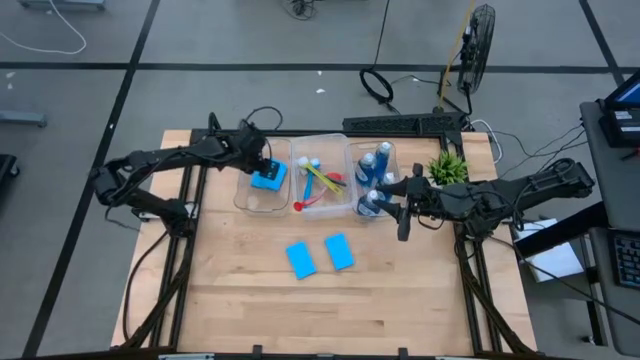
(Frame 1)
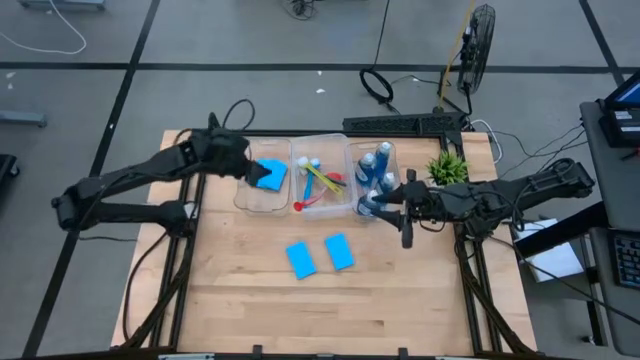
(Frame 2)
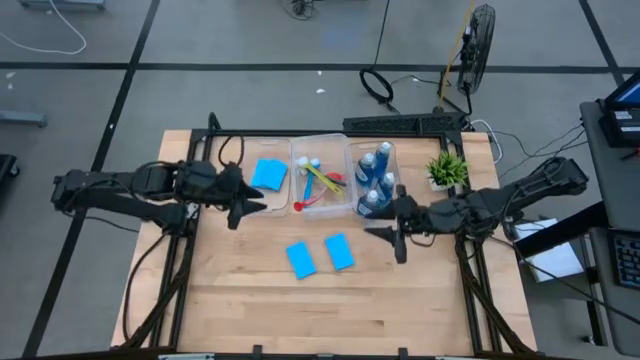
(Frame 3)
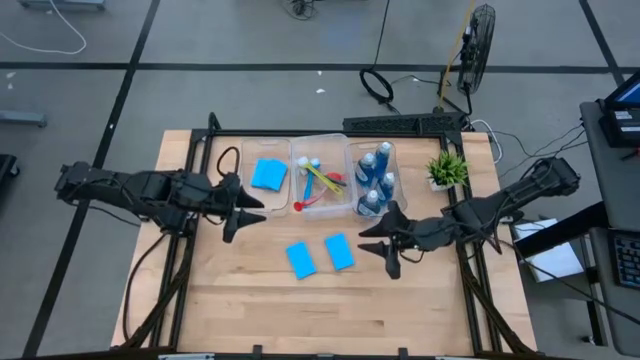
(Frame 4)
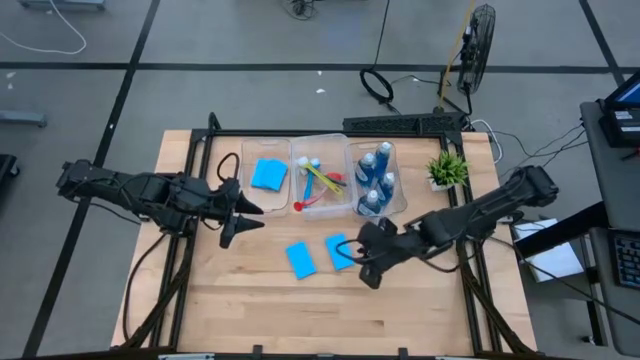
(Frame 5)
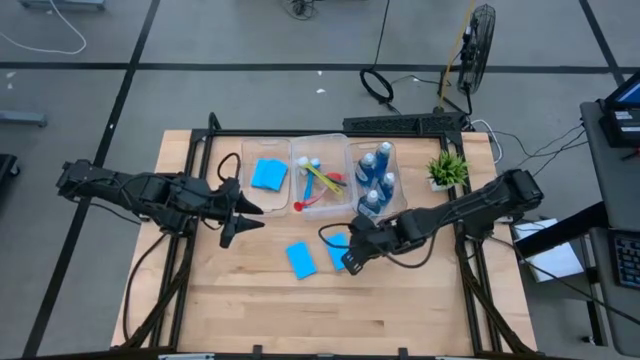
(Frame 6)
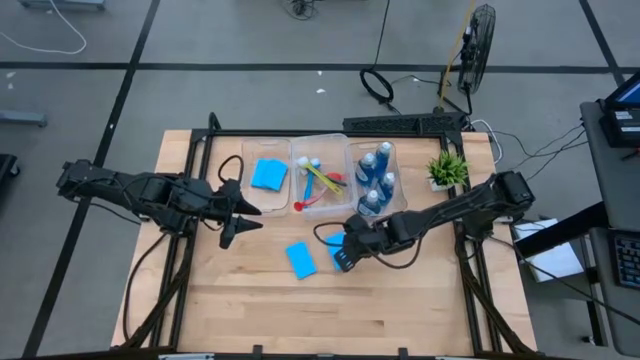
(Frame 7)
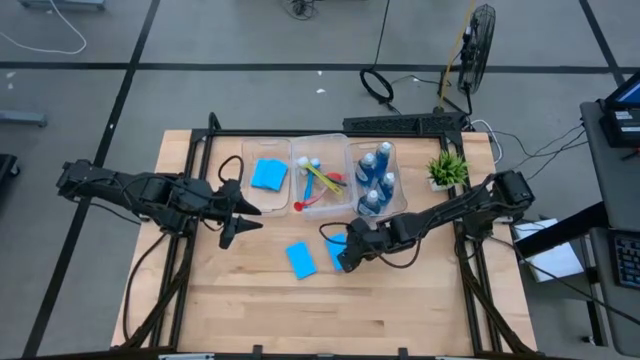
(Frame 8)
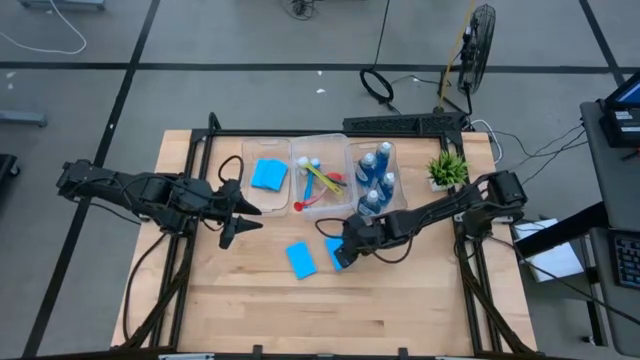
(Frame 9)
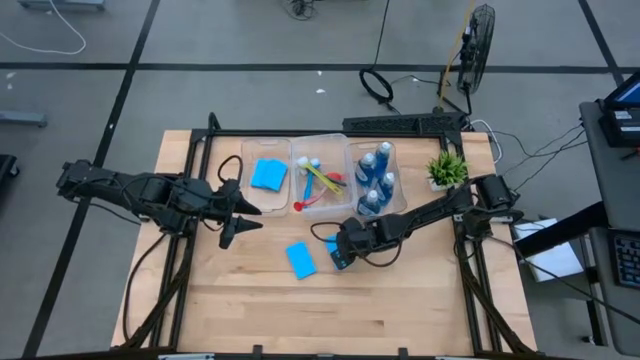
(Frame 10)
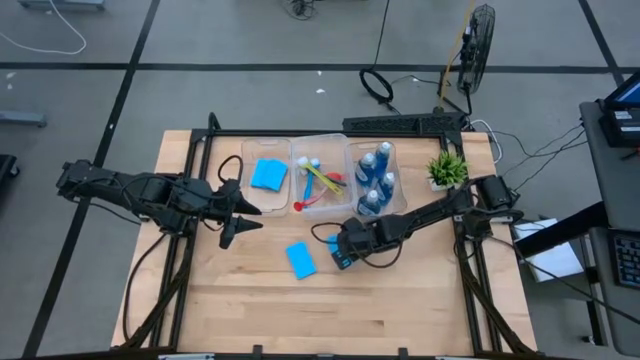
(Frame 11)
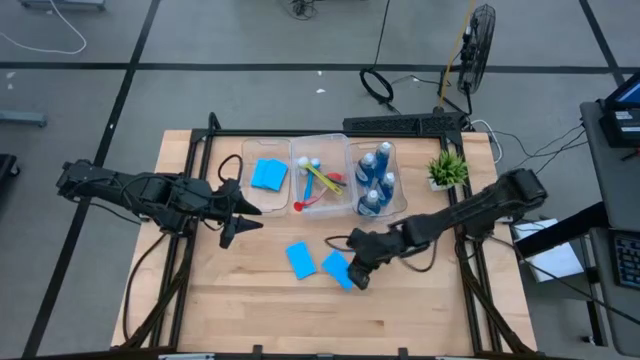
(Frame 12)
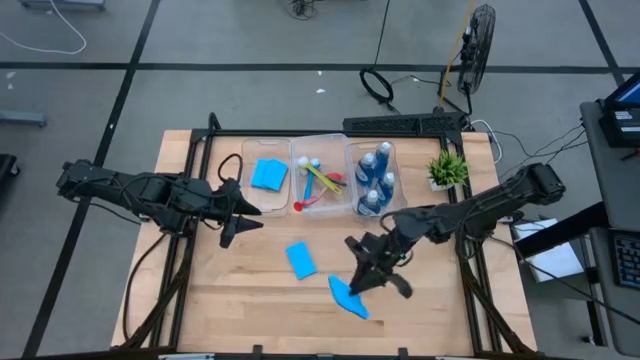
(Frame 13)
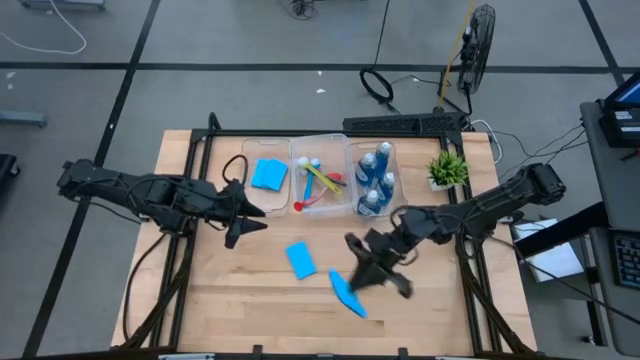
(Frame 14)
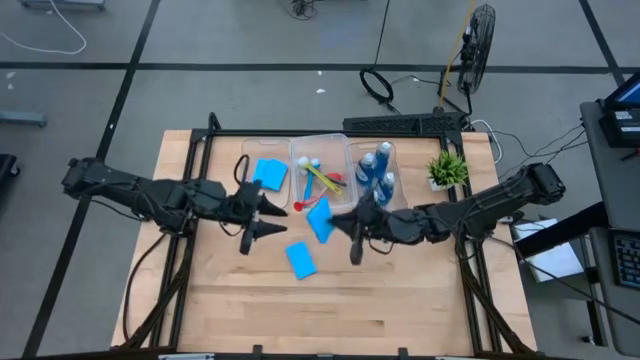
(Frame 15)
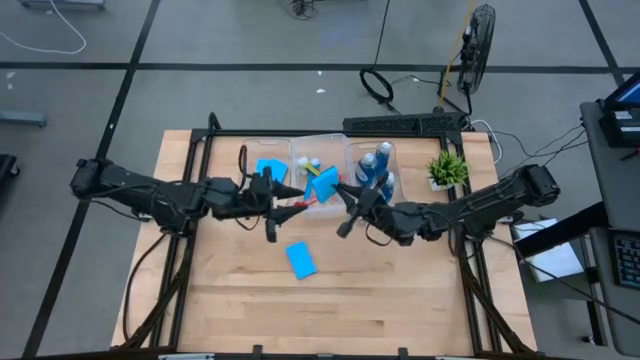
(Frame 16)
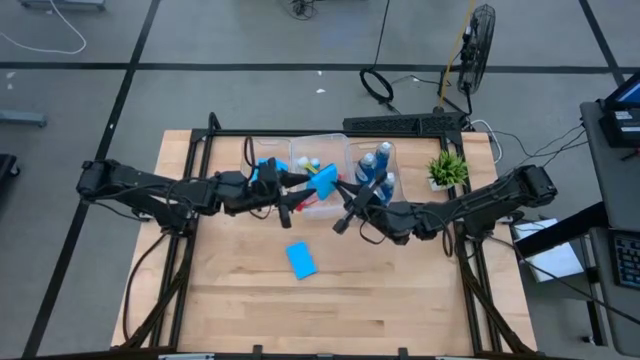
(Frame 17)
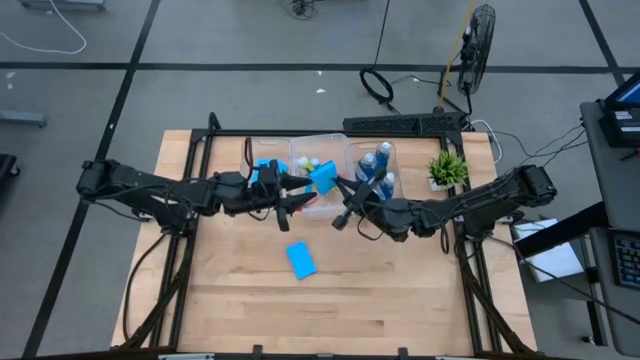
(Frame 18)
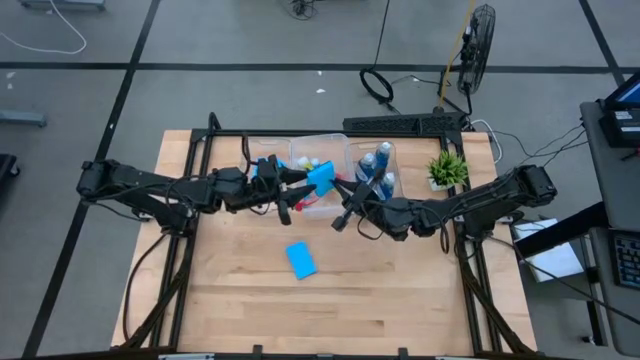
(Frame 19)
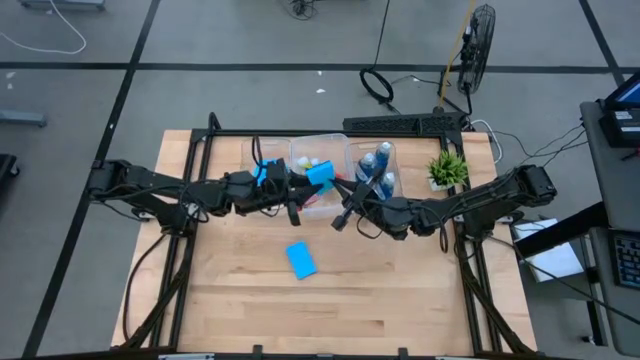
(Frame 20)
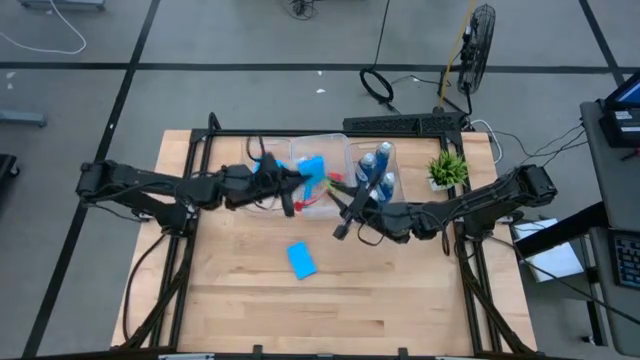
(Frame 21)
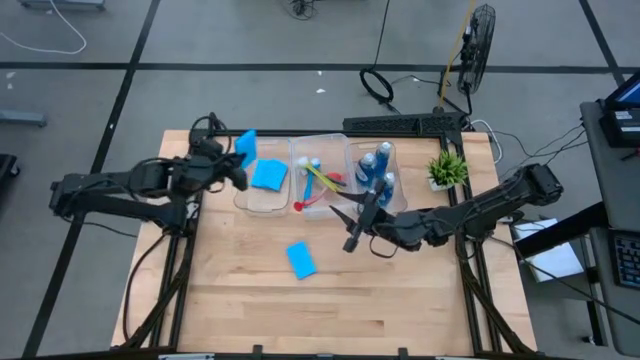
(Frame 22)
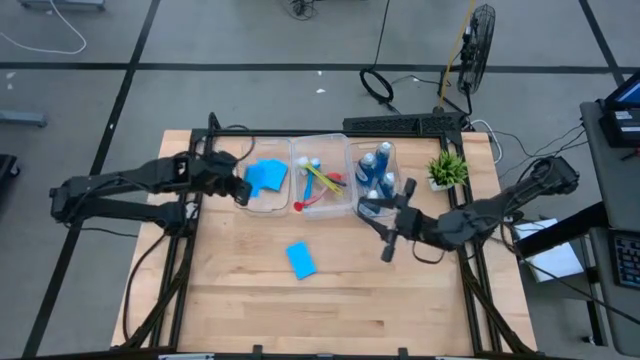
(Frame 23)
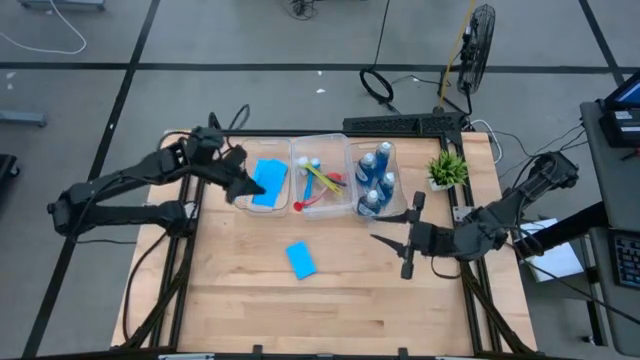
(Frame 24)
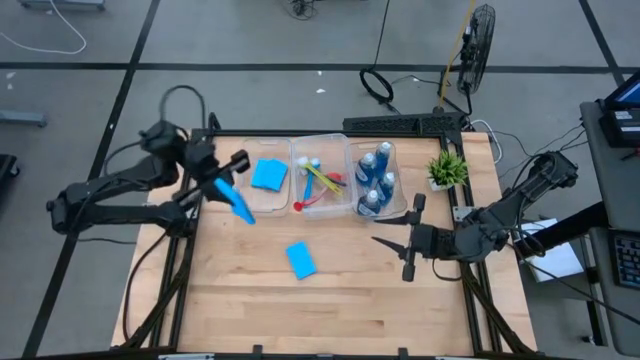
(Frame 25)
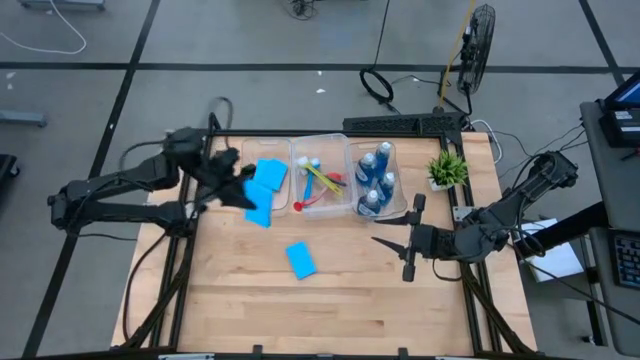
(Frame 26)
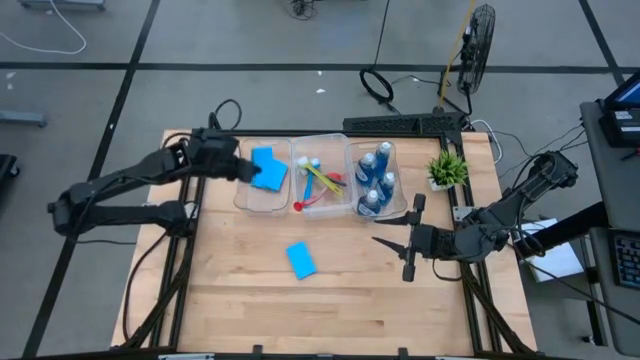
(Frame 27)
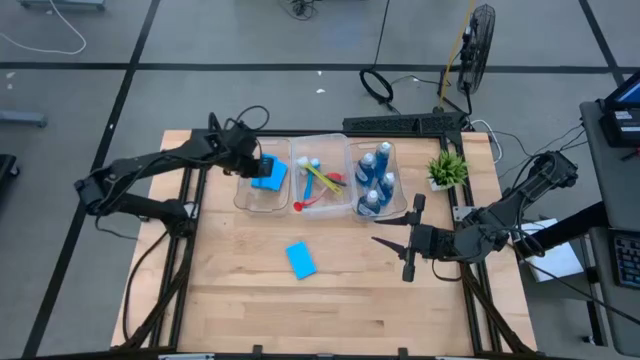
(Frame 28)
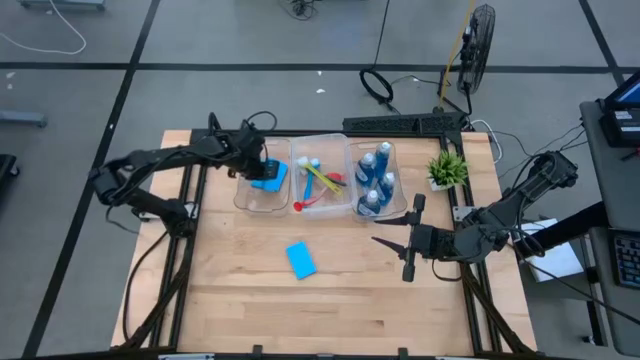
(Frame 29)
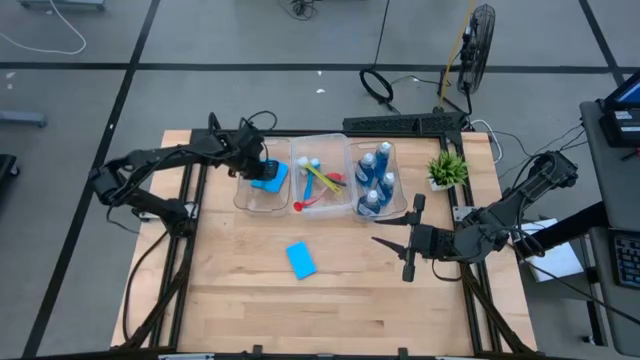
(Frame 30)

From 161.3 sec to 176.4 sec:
Task: Pick & Place Kitchen Sink Supplies
Put the blue dishwashing sponge into the left transparent bin

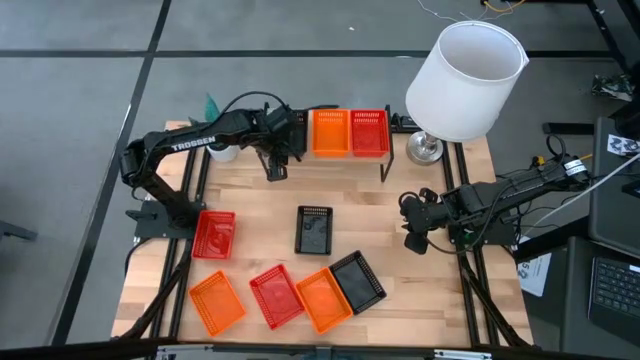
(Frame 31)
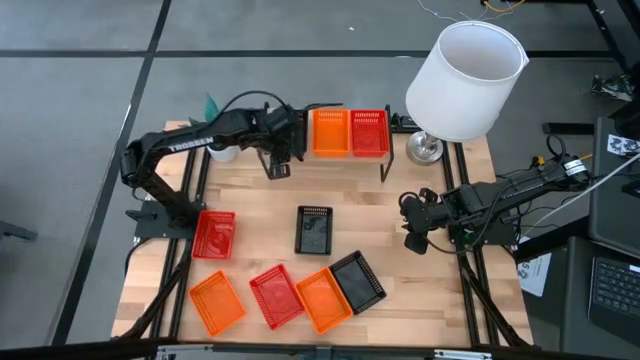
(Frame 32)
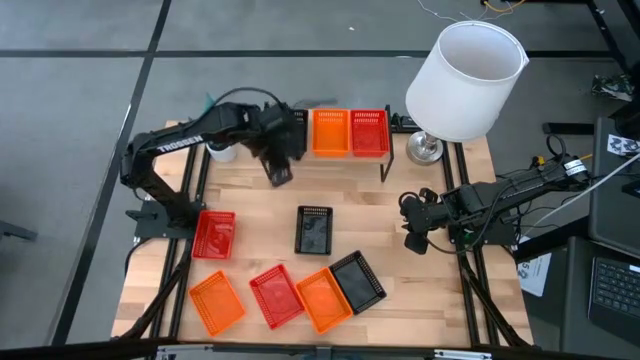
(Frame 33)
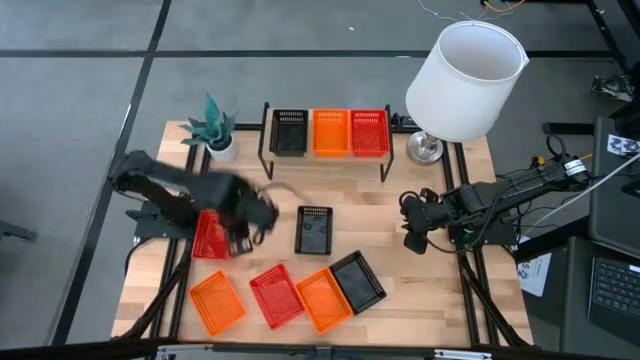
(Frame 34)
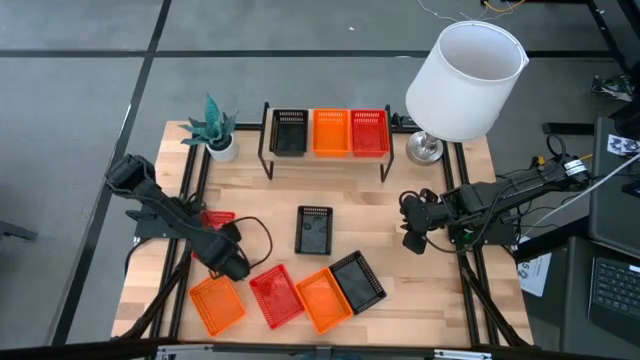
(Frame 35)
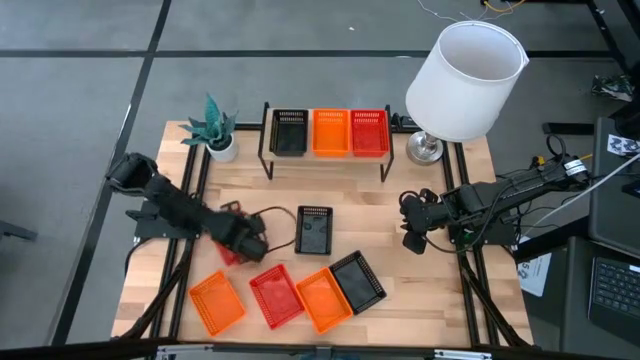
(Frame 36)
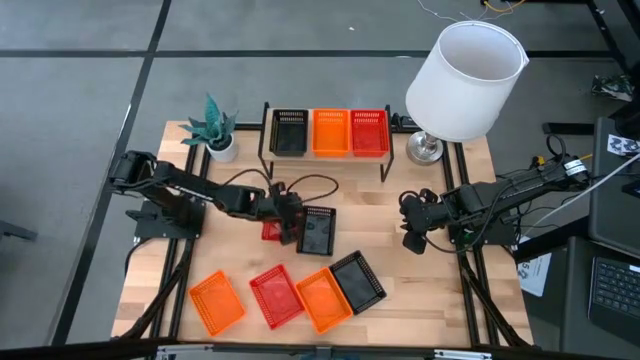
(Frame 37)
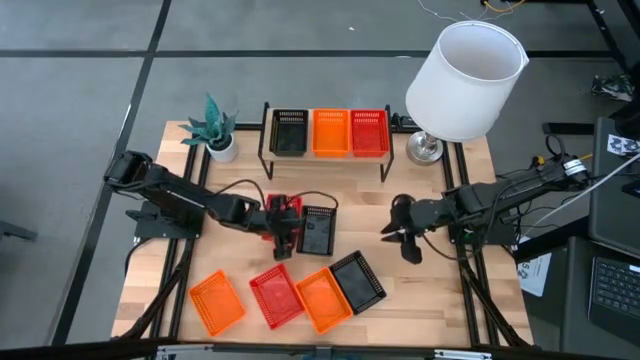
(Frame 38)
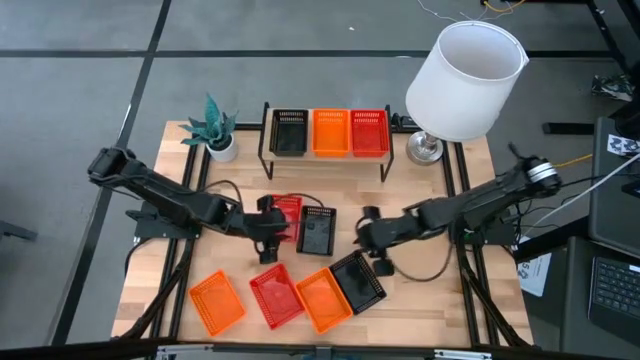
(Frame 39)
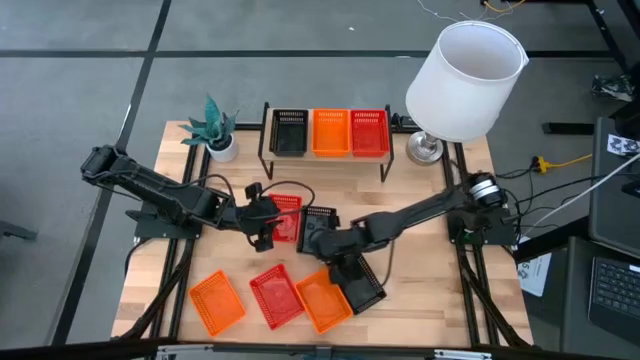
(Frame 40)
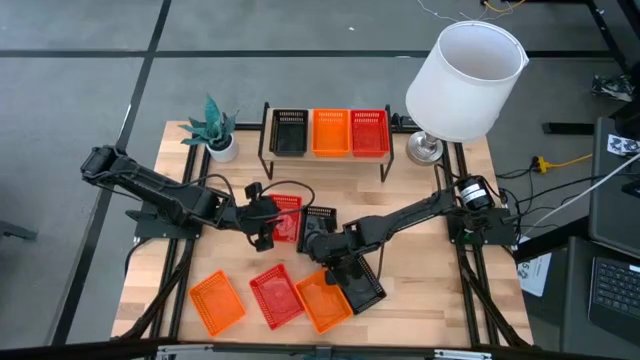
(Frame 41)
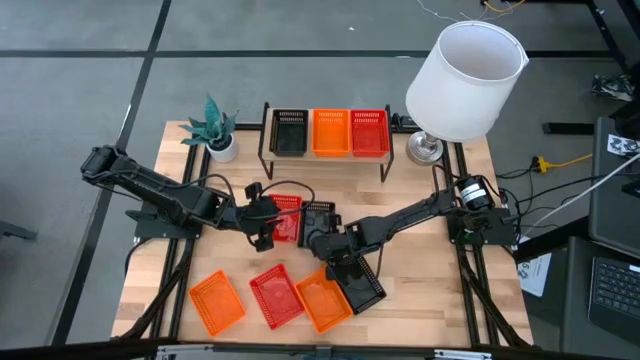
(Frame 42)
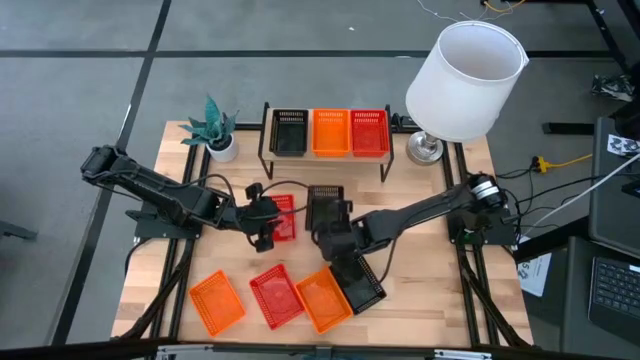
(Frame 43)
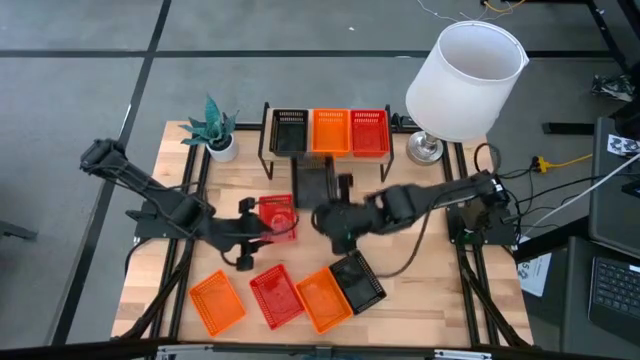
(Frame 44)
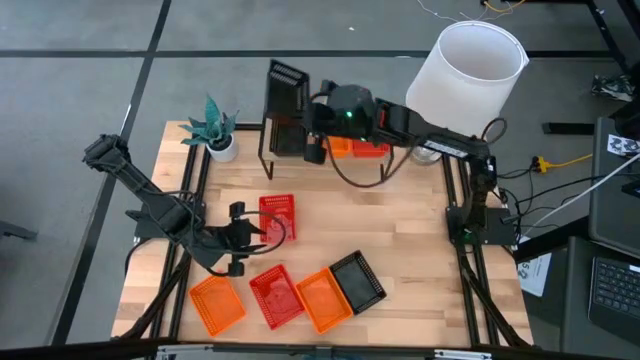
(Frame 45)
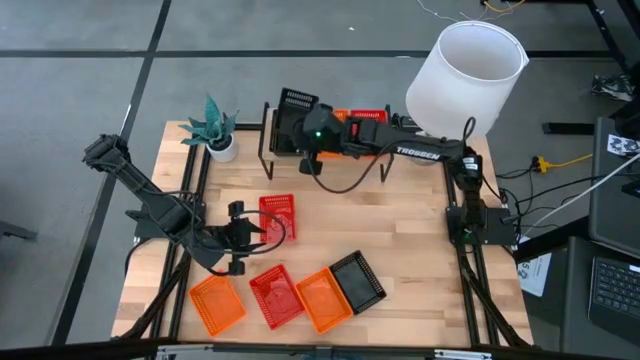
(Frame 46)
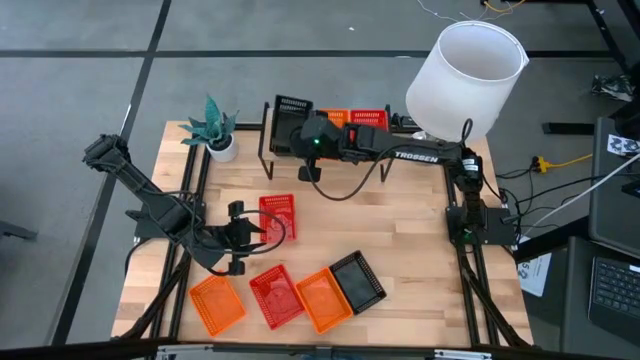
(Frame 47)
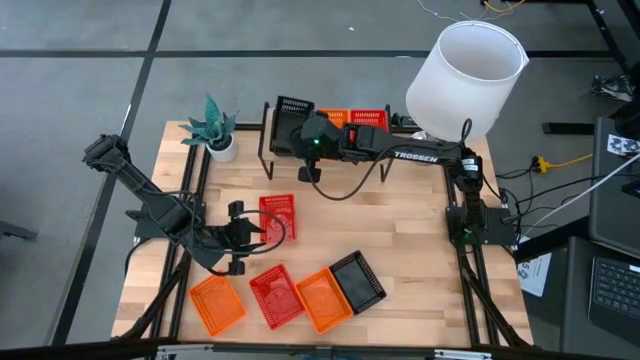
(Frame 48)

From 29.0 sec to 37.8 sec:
Task: Stack baskets on shelf by color
Stack the top black bin on top of the black bin on the shelf
